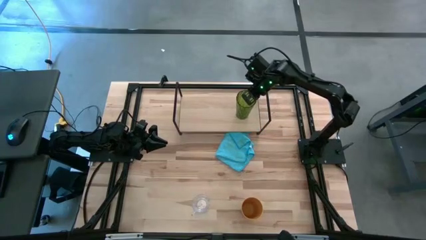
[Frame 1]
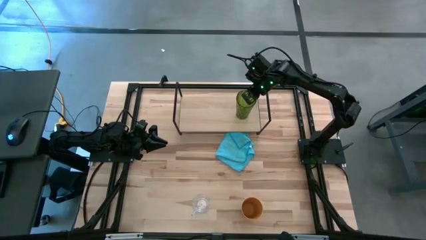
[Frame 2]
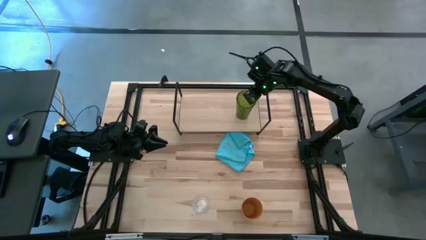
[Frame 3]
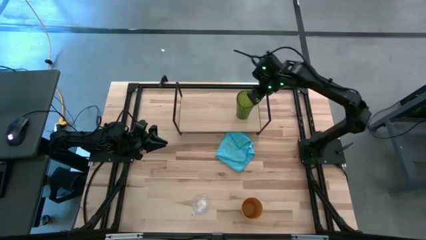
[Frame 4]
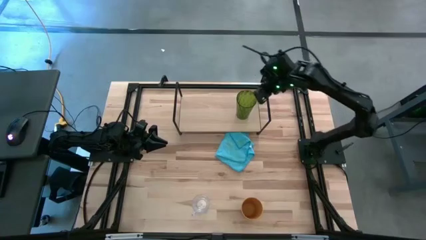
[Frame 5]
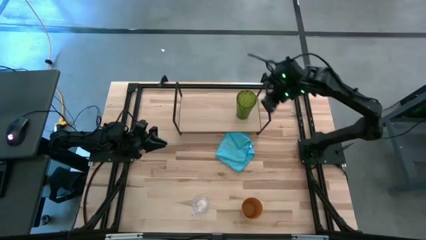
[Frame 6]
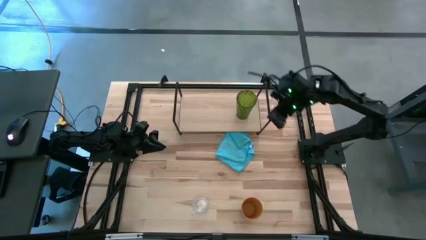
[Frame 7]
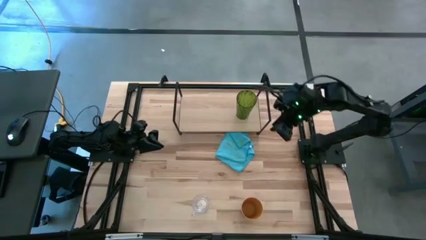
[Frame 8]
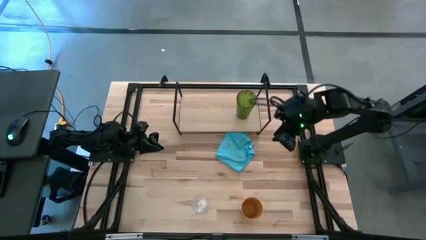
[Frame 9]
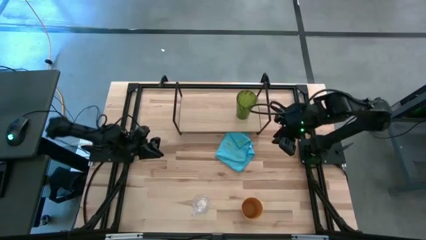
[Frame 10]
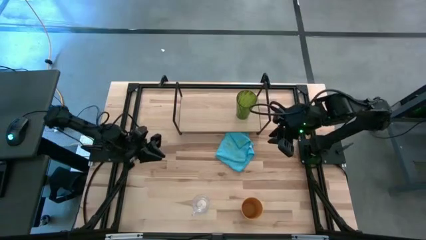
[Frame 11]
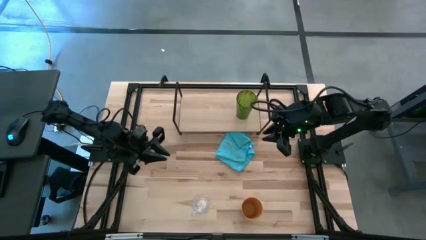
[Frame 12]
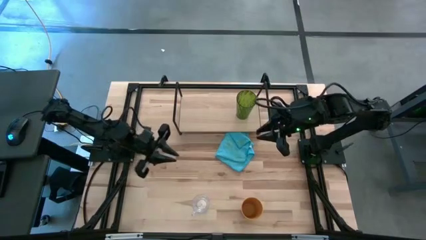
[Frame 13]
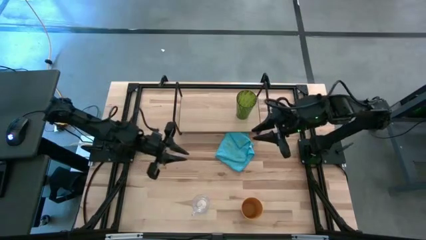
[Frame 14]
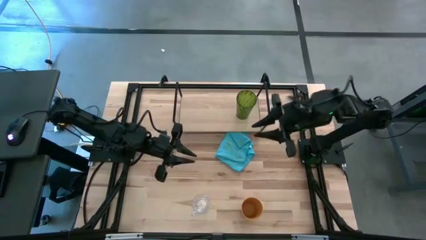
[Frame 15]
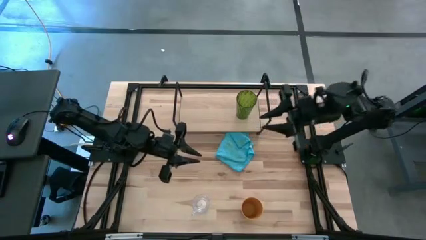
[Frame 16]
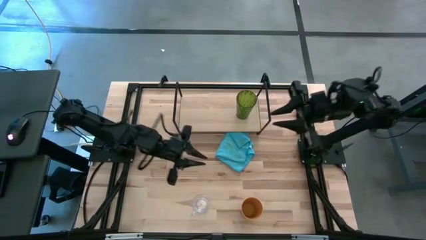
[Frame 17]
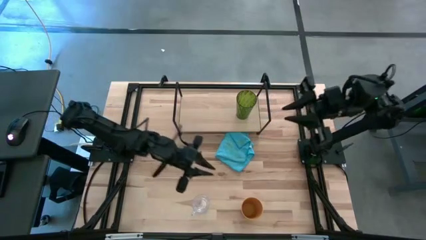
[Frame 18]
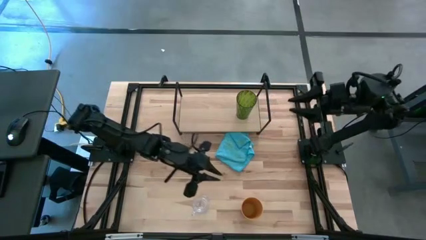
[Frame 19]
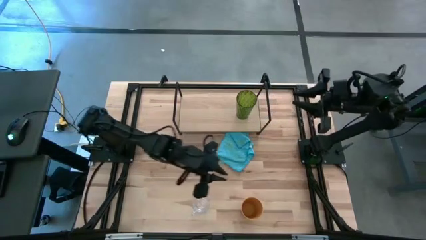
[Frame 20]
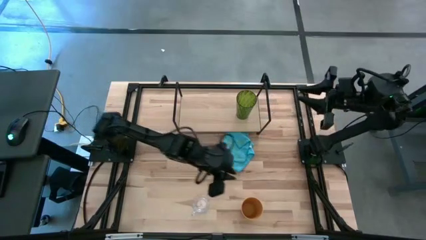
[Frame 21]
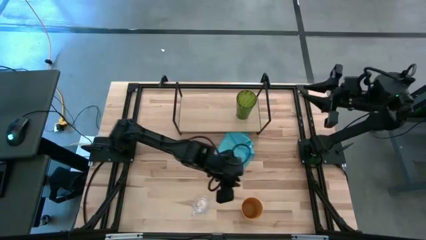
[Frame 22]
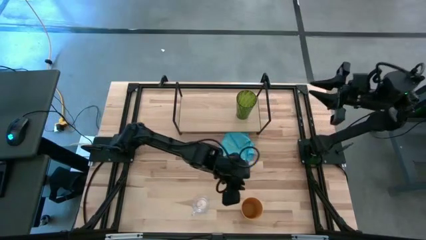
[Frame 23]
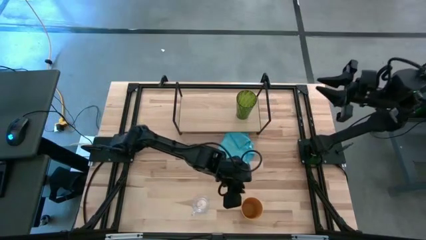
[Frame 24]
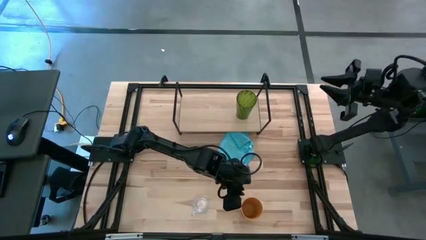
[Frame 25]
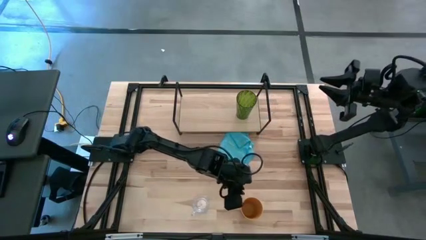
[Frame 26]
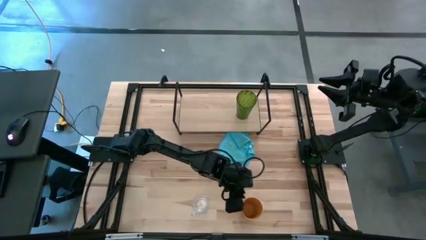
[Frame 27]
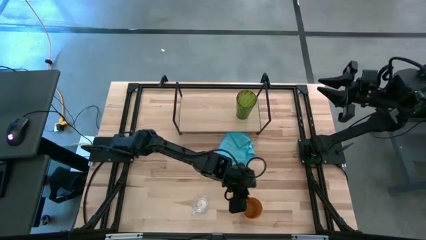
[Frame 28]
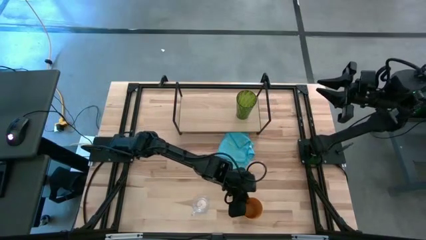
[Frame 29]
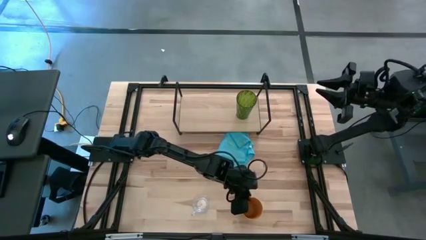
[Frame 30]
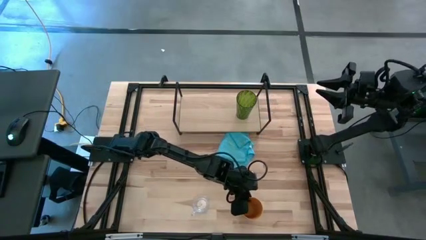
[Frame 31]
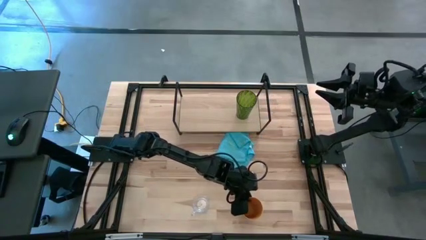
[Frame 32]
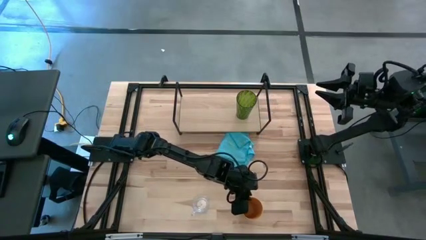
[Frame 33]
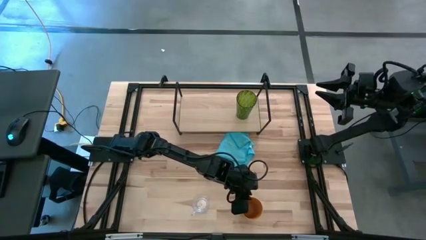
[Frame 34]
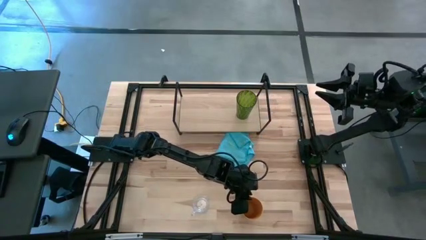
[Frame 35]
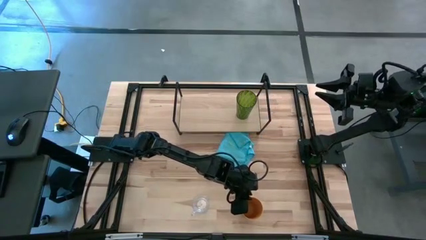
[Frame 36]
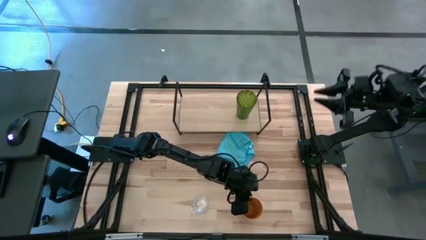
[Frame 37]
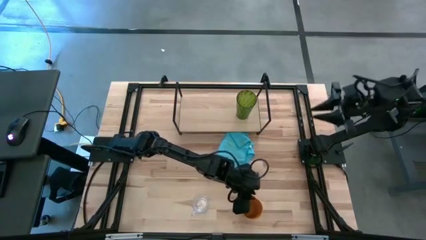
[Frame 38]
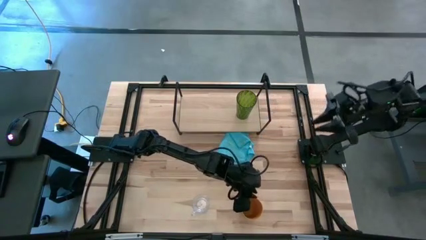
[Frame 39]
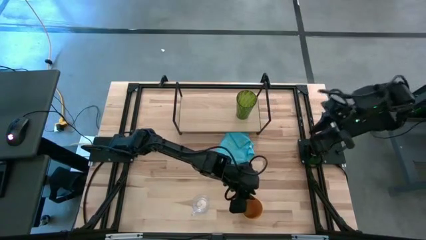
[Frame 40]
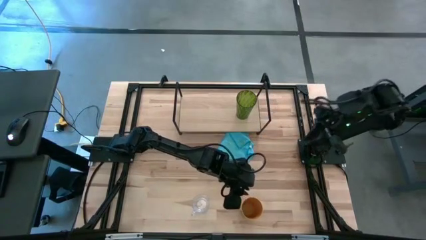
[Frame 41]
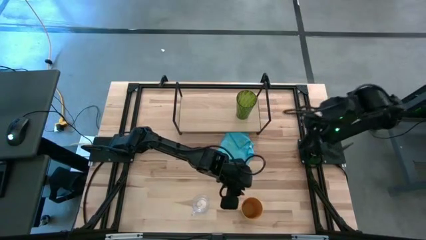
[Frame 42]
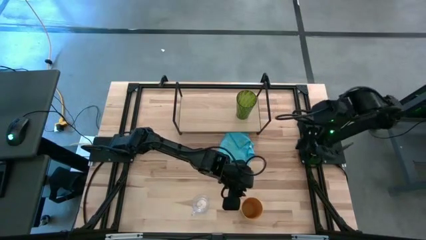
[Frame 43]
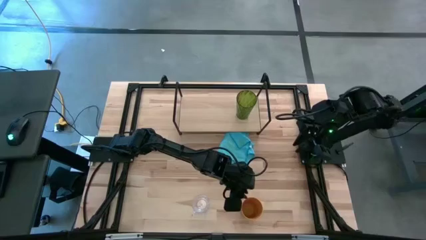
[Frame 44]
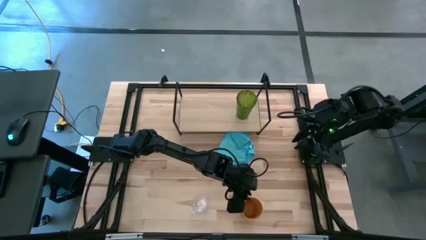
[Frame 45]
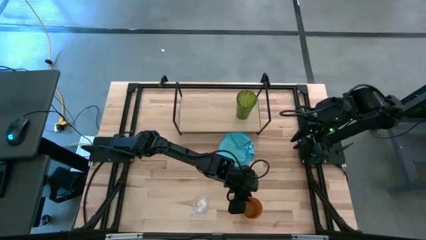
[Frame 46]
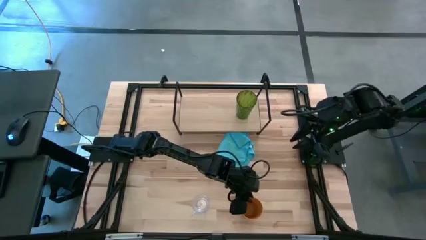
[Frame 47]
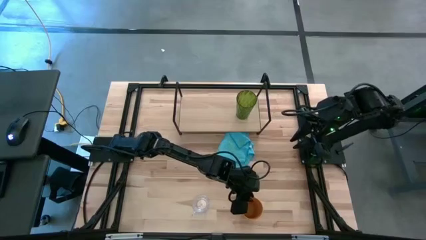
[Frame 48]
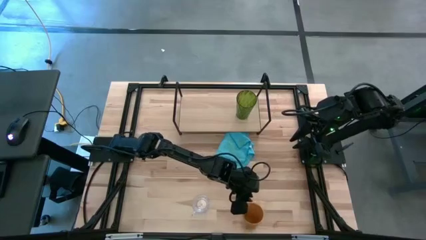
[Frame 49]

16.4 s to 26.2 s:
Task: Stack small to large cups/mugs on shelf
Put the yellow cup on the shelf
